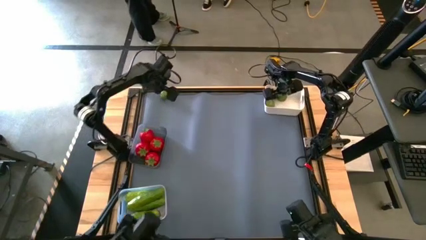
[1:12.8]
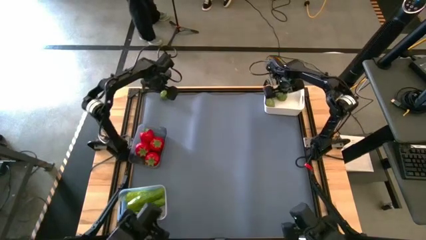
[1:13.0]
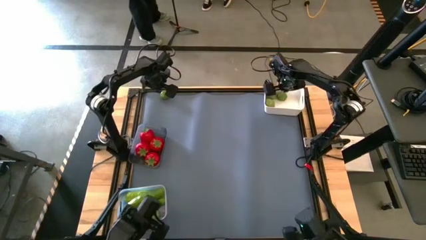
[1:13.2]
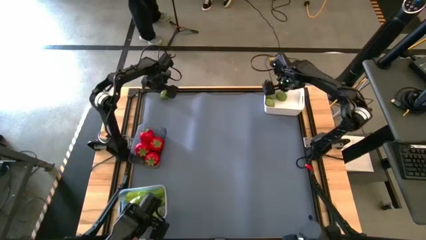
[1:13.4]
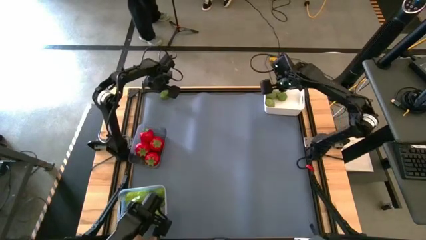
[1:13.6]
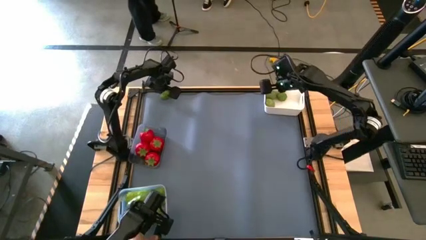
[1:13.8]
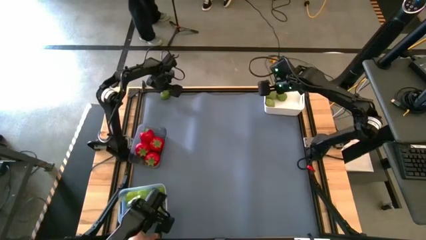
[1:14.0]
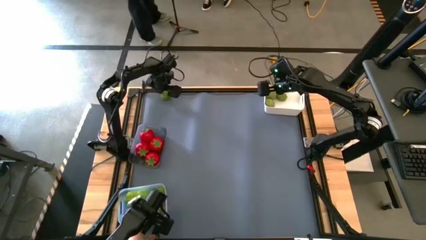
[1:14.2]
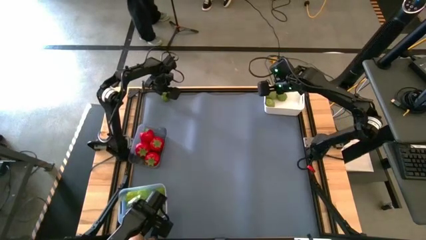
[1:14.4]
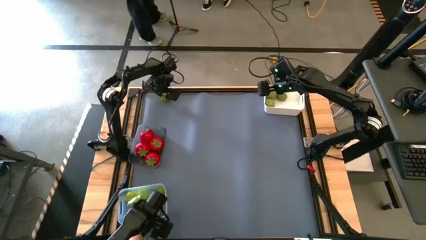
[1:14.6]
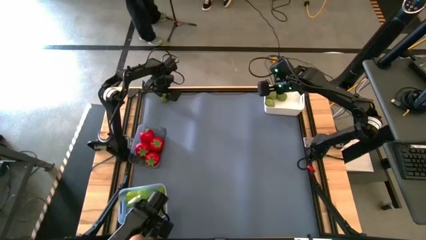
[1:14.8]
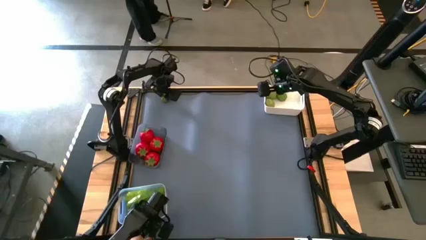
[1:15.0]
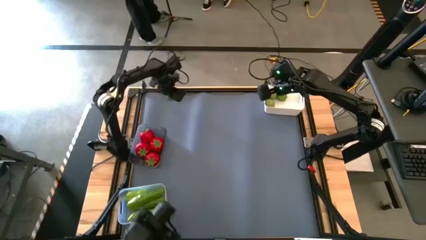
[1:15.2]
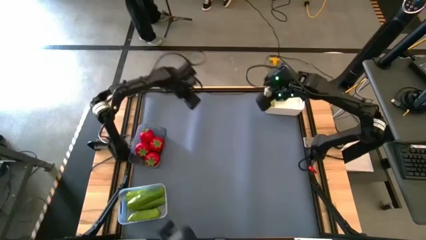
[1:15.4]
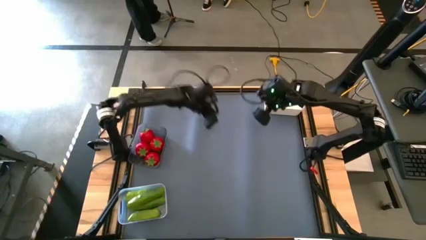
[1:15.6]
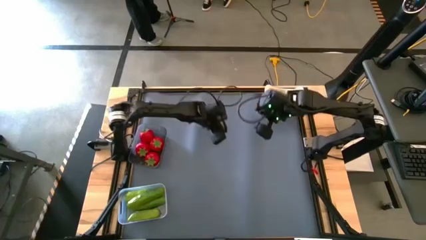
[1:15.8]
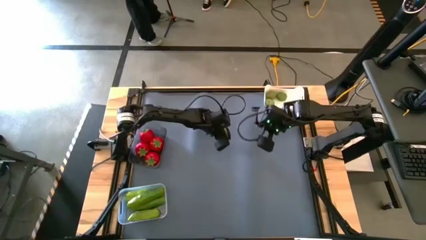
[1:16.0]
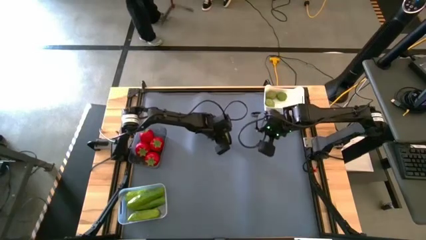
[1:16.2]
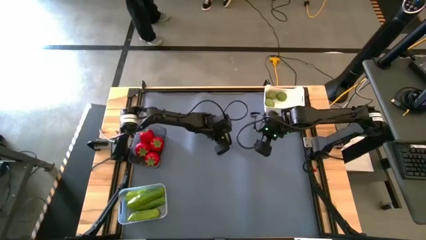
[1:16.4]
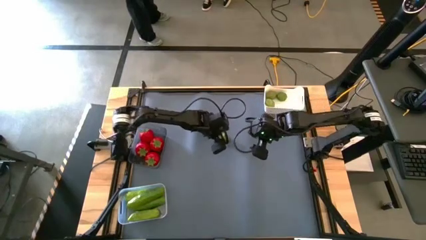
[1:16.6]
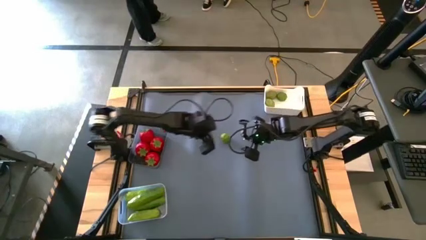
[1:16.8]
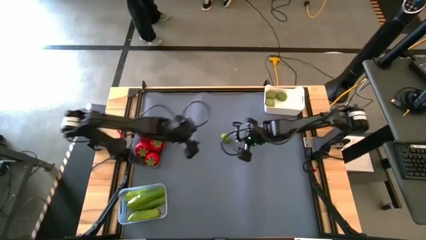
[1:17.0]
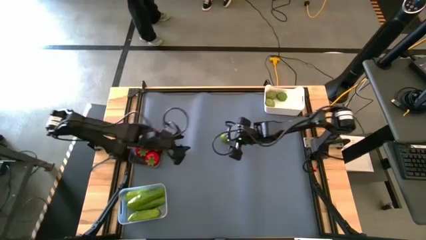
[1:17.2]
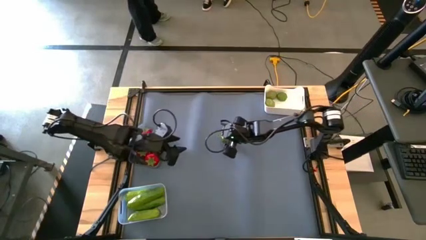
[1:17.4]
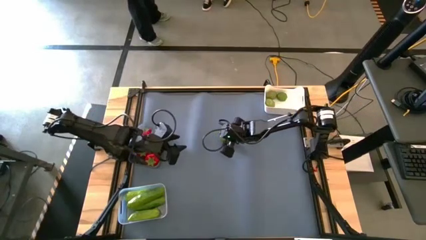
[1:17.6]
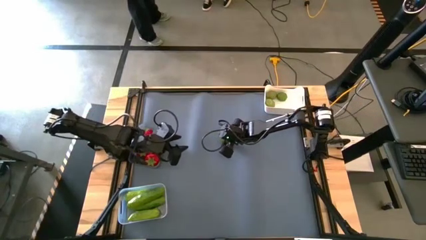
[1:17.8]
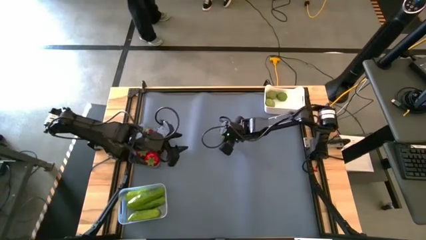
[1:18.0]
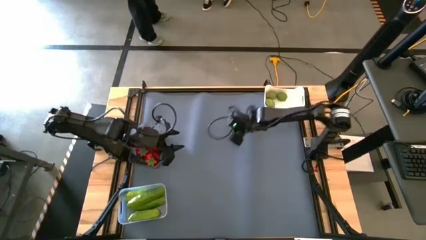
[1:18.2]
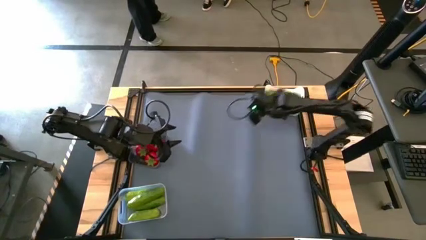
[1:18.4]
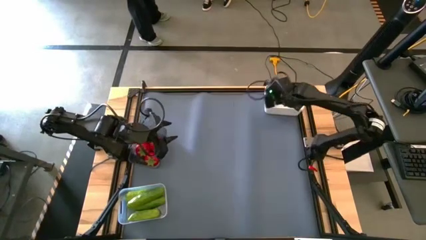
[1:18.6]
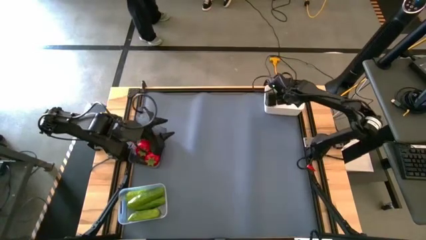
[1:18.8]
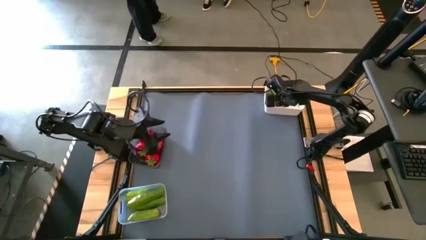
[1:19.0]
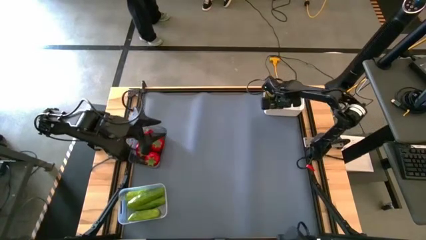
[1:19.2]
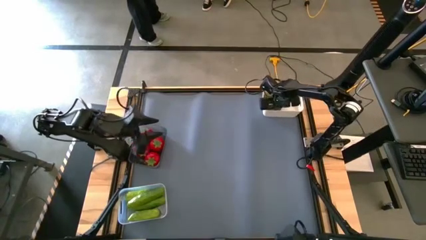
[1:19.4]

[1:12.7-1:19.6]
Task: Sort produce into baskets
Put the lime into the white bin

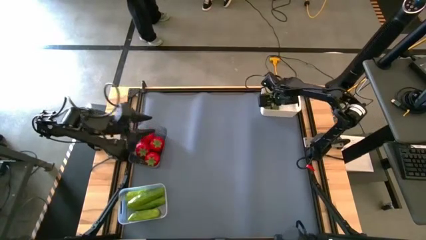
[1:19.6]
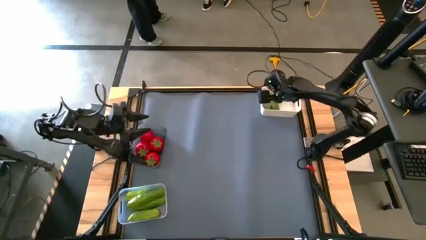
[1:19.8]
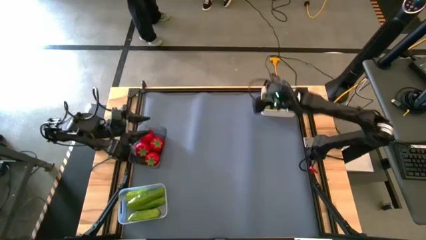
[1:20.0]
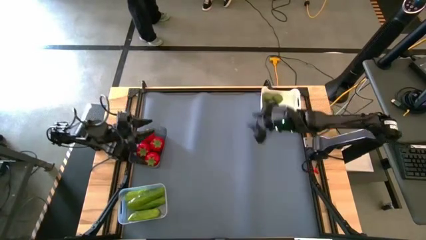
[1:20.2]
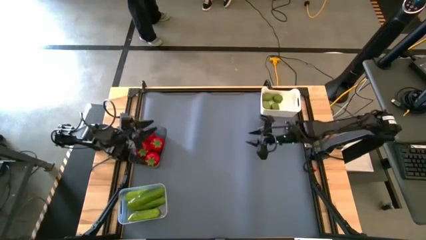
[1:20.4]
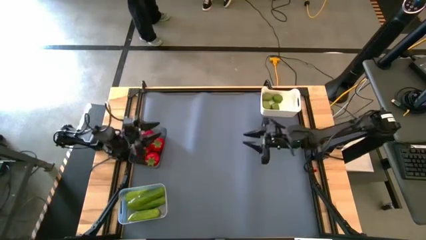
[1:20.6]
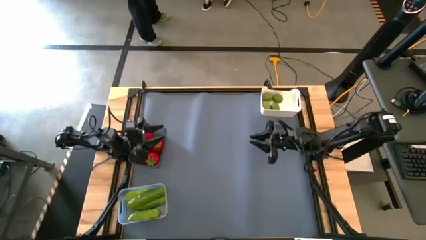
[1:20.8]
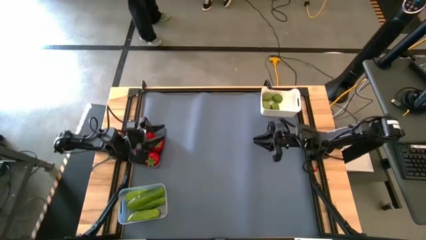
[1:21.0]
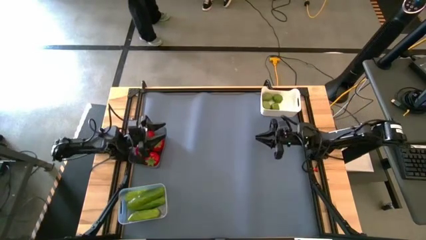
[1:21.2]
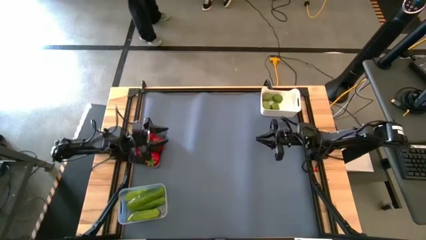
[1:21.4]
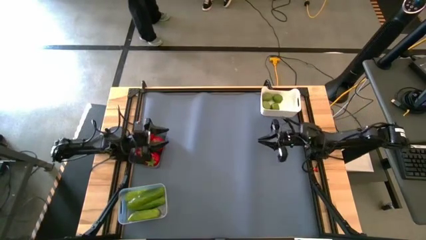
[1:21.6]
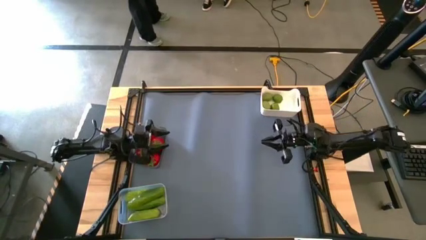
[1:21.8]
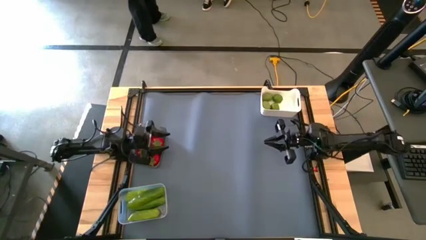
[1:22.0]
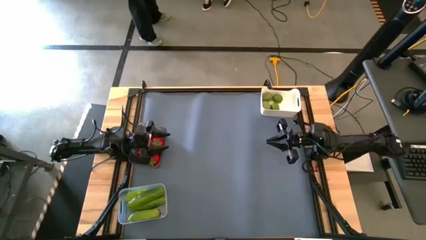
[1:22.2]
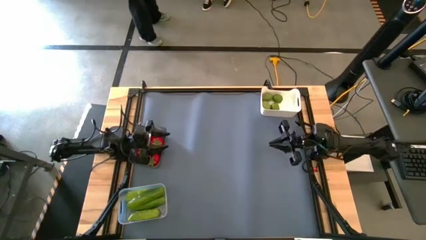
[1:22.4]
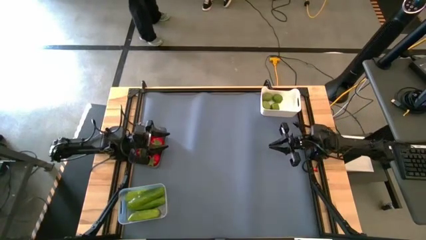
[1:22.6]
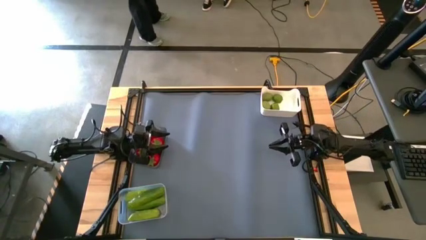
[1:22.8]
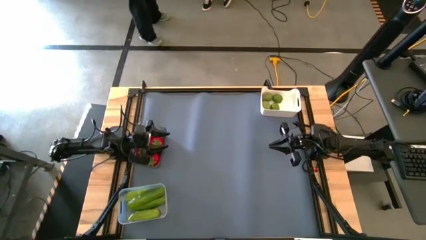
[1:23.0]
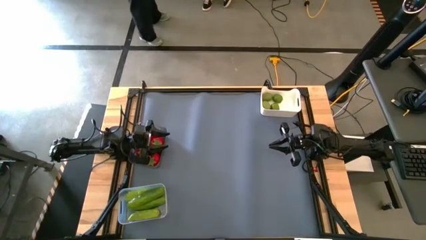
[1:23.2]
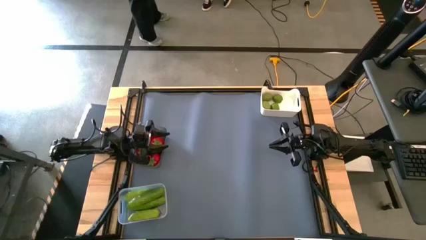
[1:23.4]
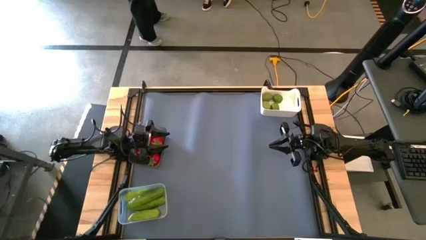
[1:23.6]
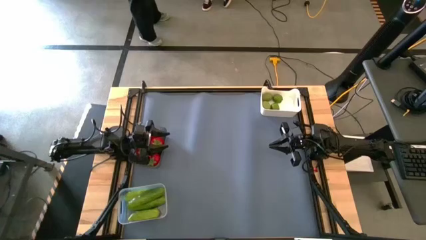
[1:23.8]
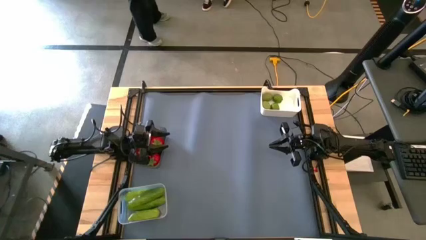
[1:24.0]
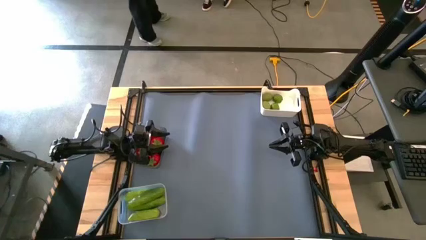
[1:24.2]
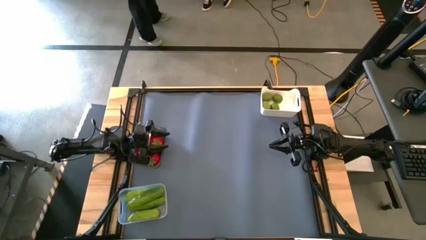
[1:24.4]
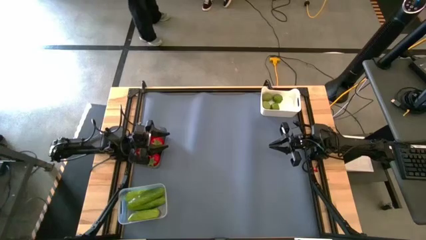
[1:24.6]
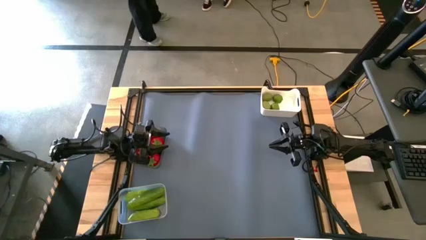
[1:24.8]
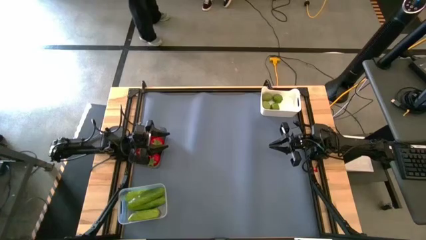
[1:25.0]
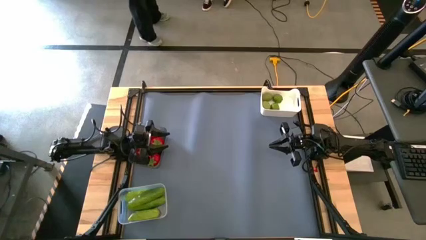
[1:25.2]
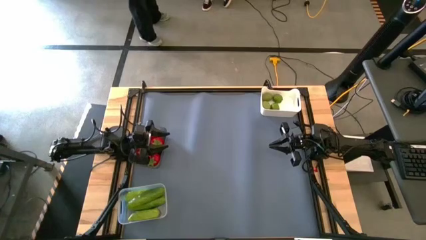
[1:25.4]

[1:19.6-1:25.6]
Return to Home Position

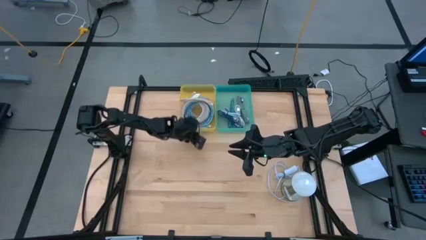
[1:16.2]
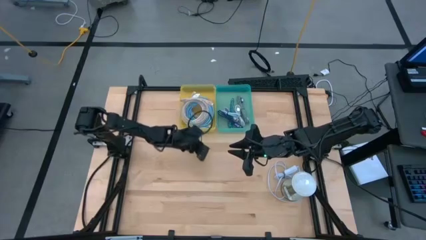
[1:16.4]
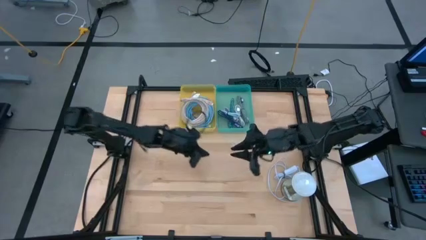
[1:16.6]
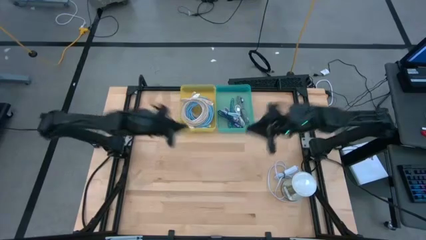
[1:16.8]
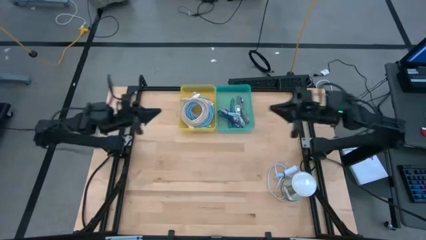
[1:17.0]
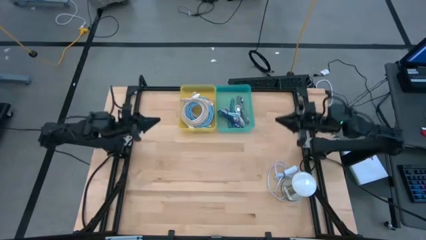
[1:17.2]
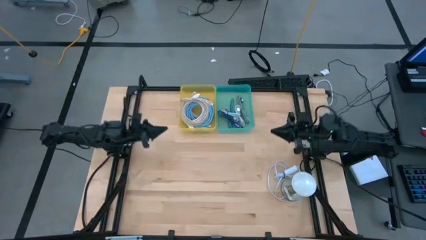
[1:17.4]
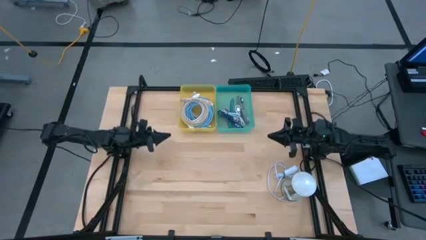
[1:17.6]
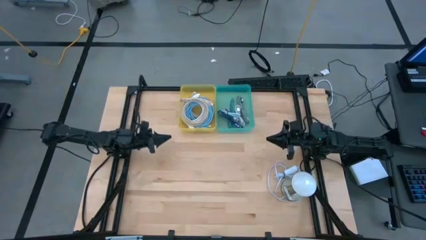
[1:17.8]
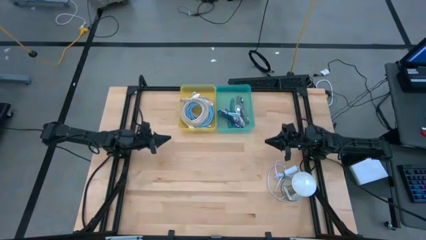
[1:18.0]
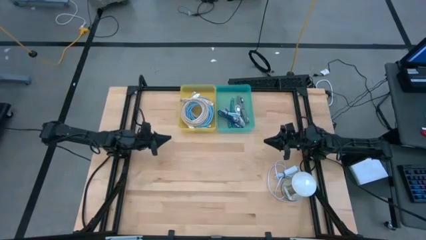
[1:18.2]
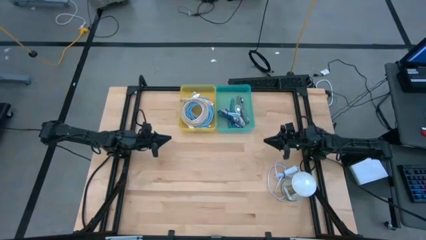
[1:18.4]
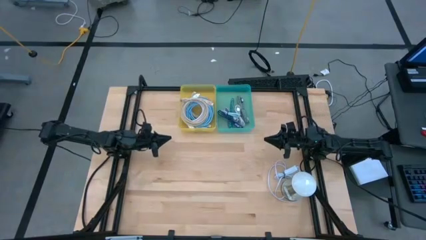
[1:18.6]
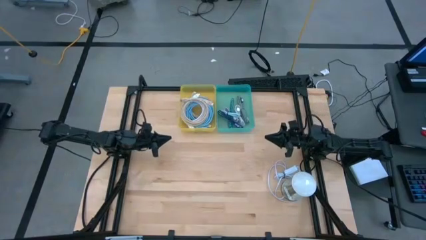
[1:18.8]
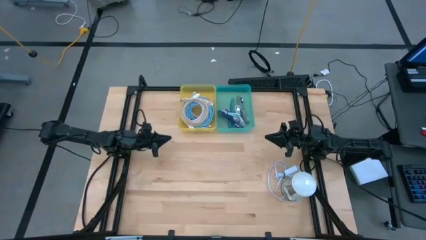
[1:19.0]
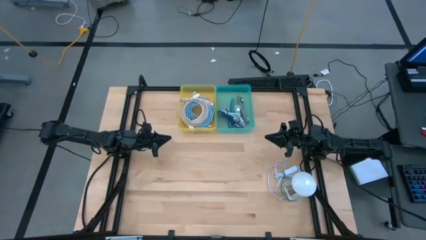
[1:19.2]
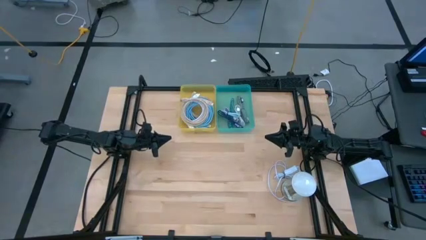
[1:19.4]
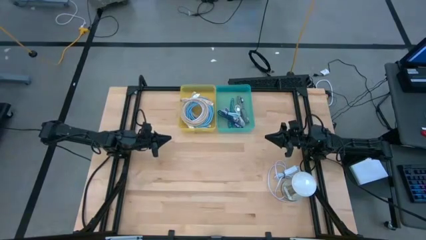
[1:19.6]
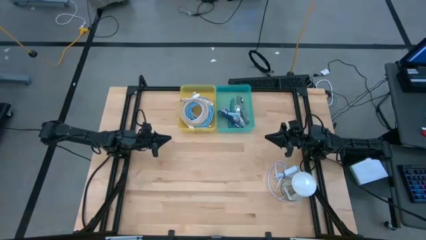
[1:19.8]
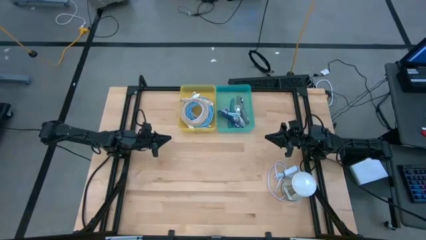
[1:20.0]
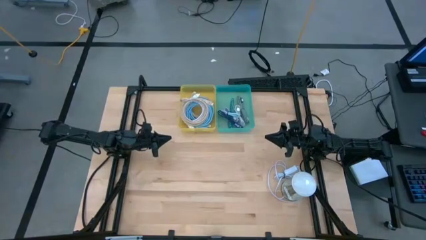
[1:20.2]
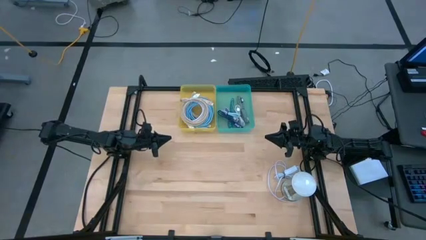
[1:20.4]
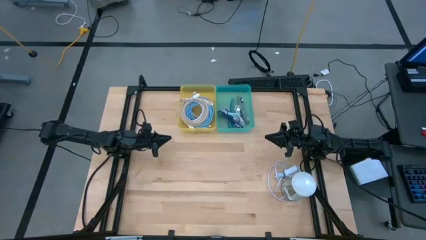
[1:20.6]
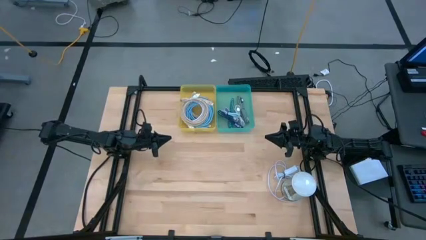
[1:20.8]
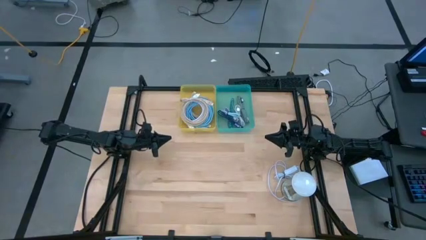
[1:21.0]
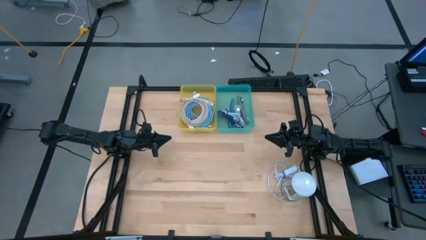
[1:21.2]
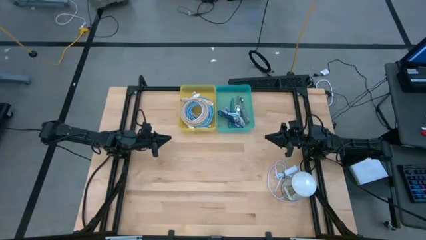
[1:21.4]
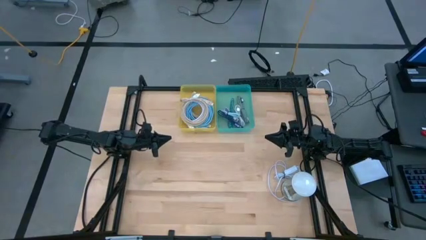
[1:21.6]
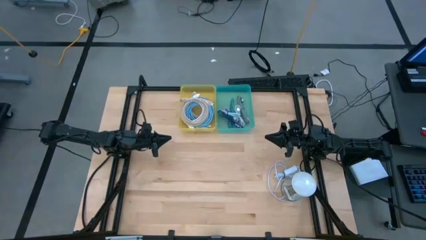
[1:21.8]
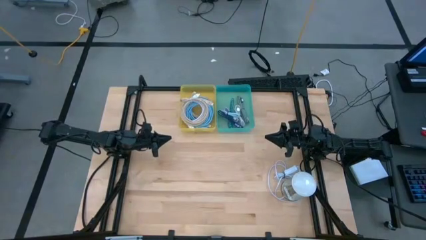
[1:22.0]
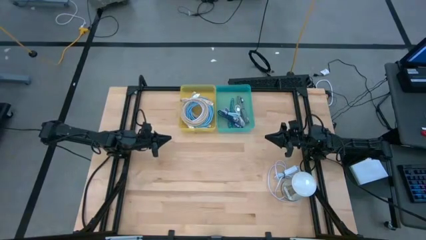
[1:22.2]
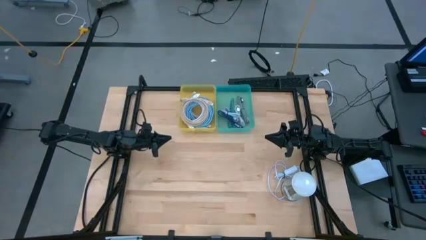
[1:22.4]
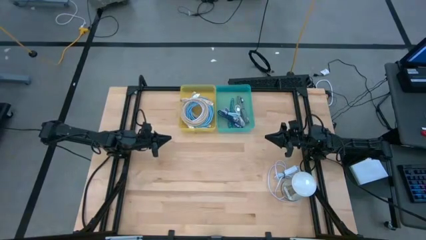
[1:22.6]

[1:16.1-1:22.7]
Task: Pick & Place USB Port
Return to Home Position
